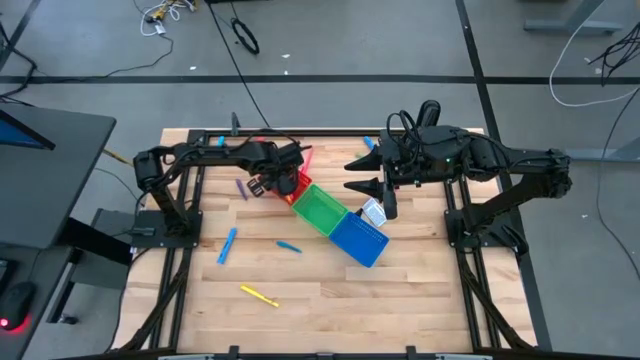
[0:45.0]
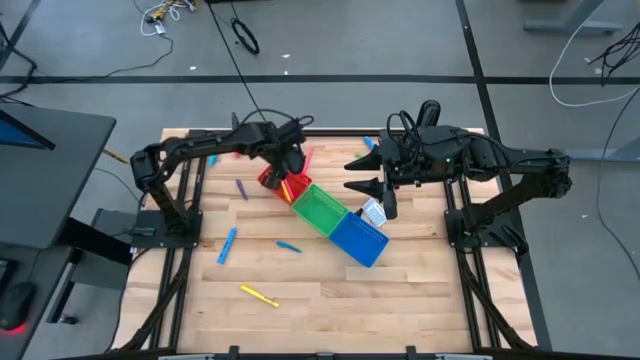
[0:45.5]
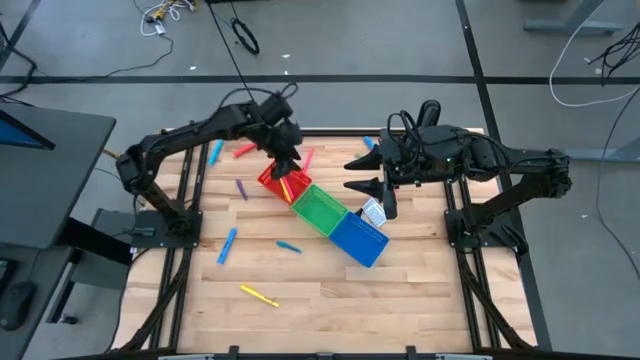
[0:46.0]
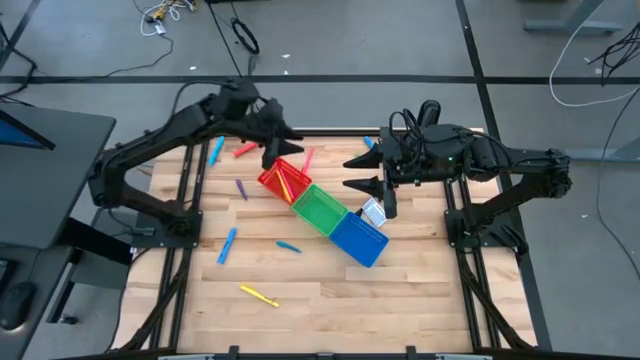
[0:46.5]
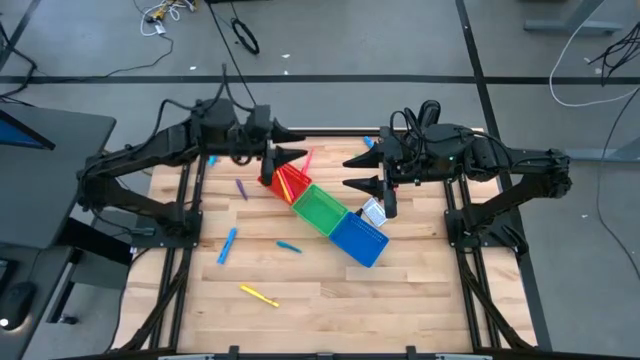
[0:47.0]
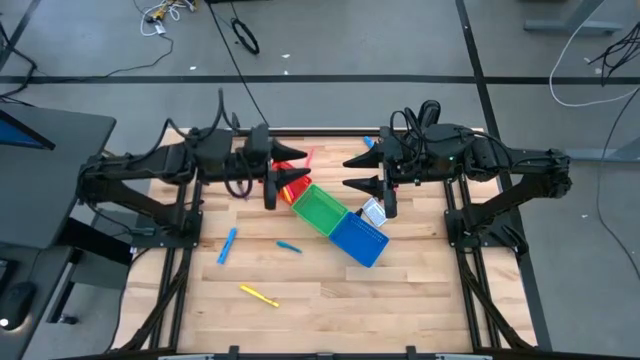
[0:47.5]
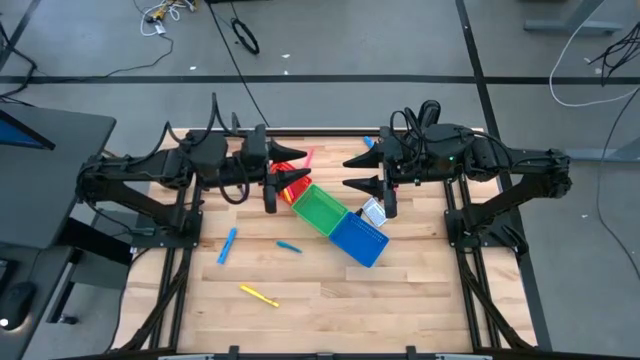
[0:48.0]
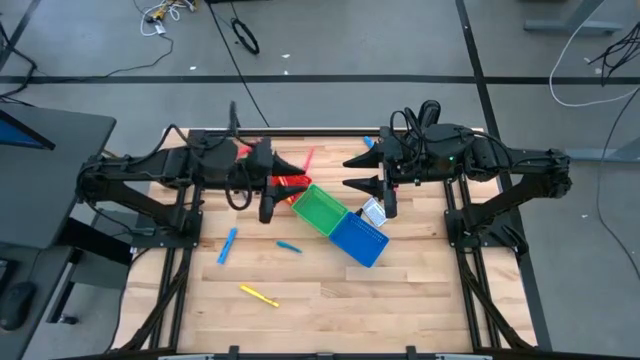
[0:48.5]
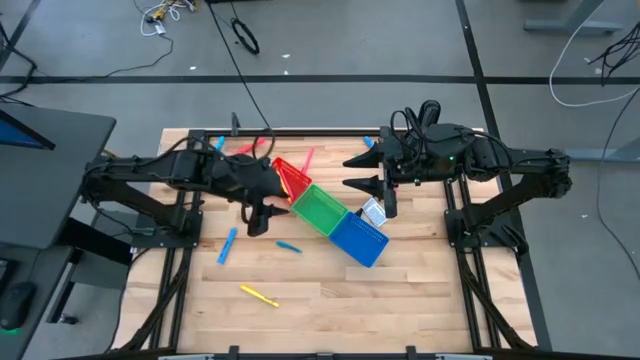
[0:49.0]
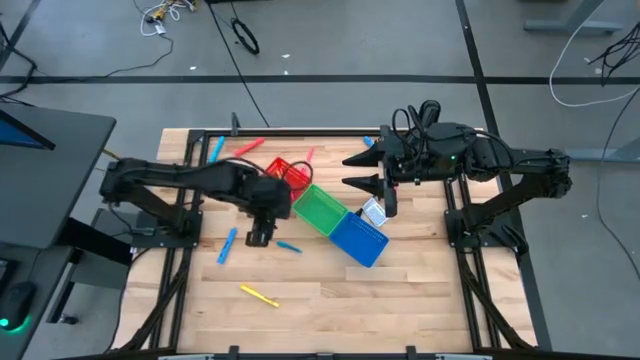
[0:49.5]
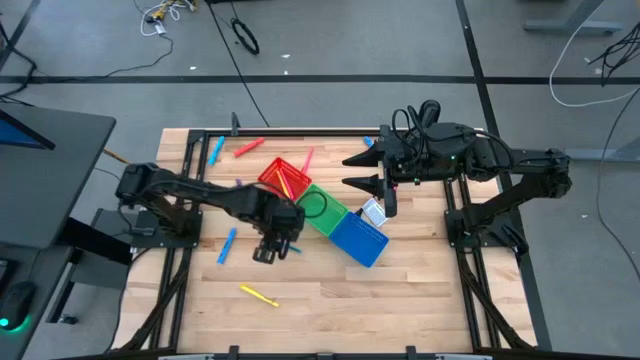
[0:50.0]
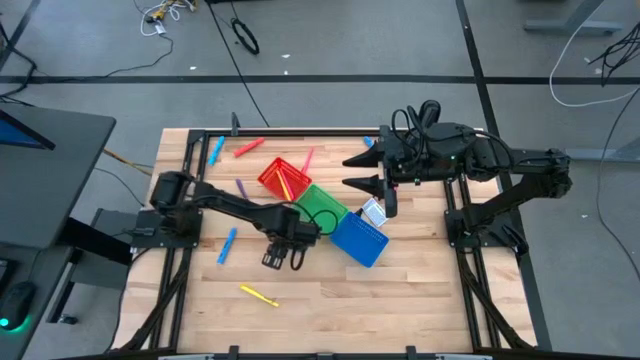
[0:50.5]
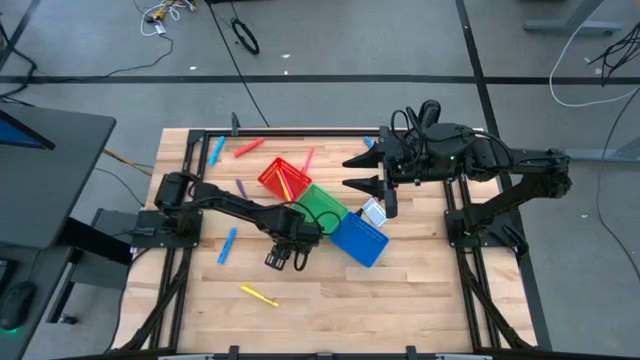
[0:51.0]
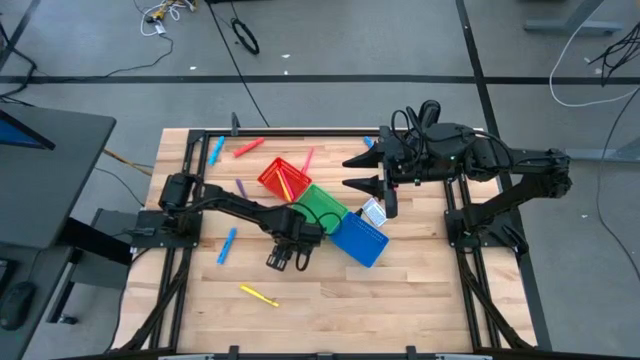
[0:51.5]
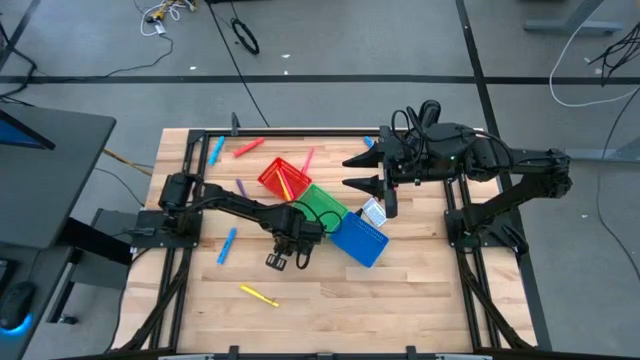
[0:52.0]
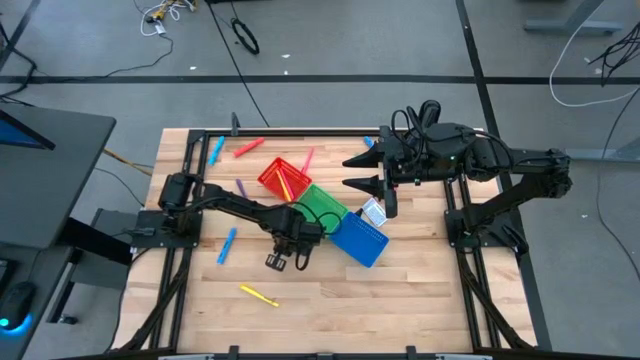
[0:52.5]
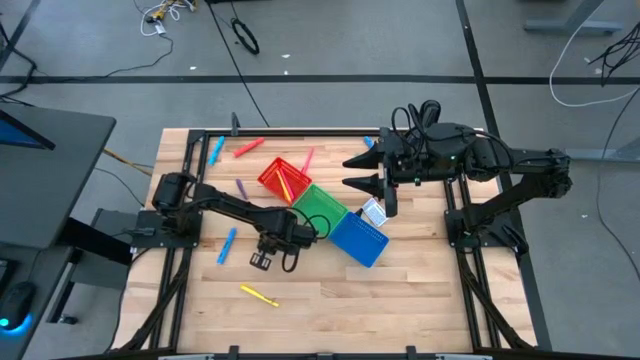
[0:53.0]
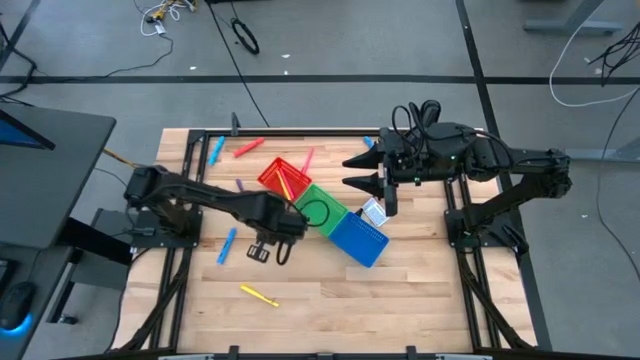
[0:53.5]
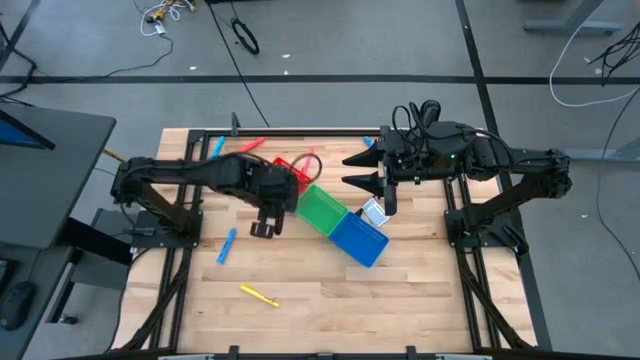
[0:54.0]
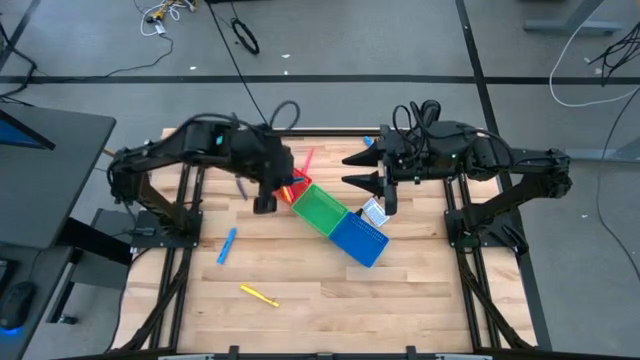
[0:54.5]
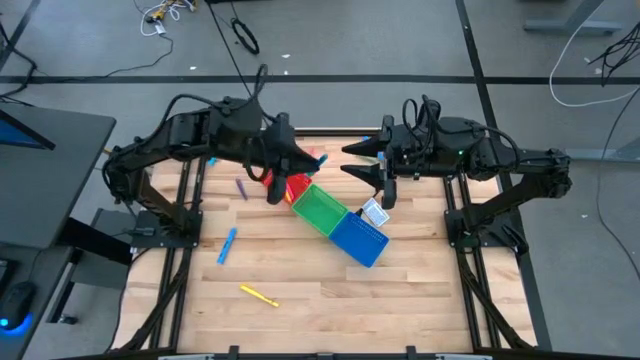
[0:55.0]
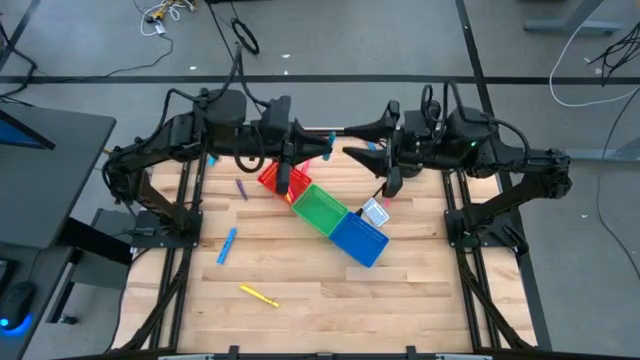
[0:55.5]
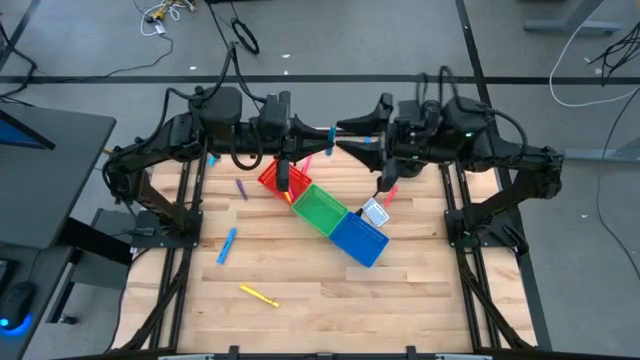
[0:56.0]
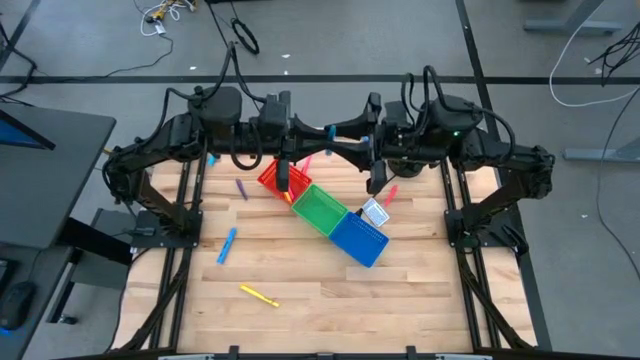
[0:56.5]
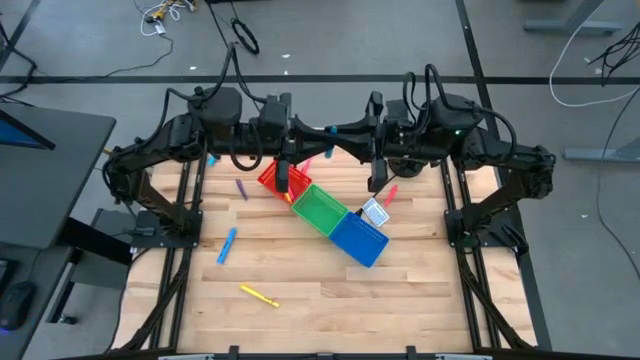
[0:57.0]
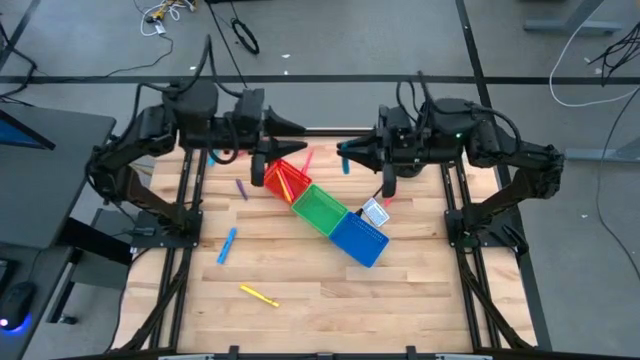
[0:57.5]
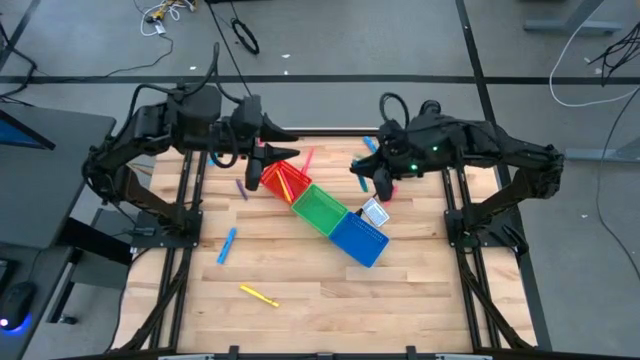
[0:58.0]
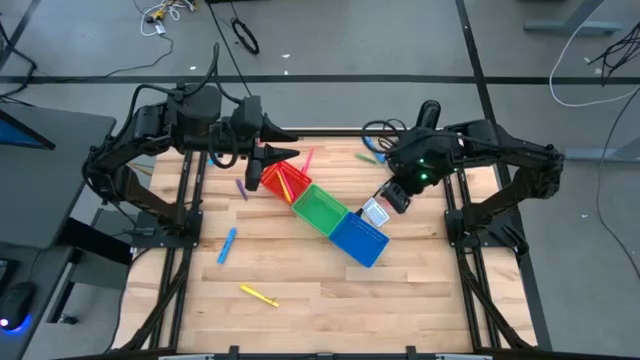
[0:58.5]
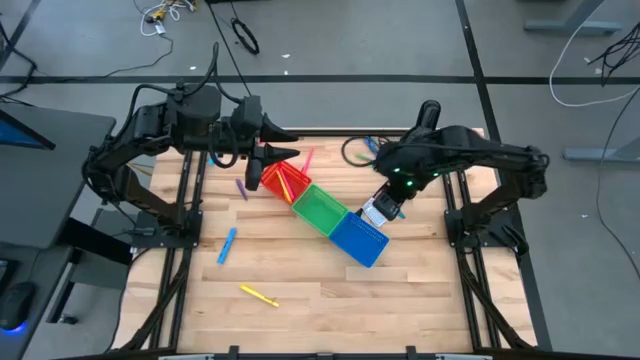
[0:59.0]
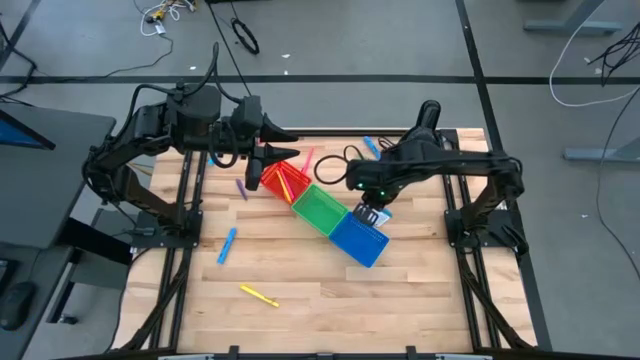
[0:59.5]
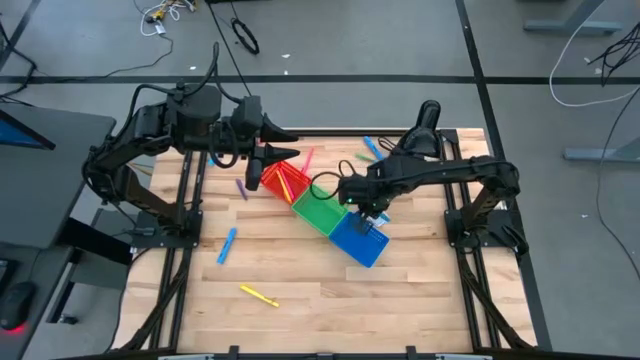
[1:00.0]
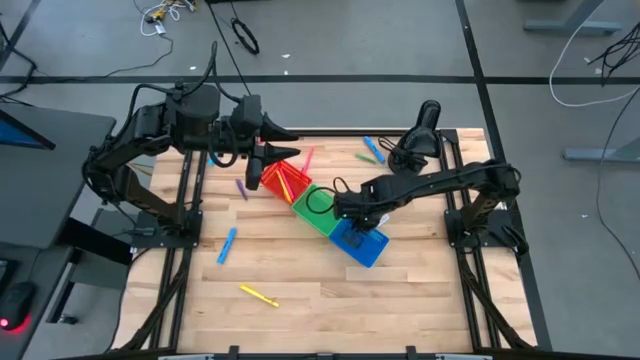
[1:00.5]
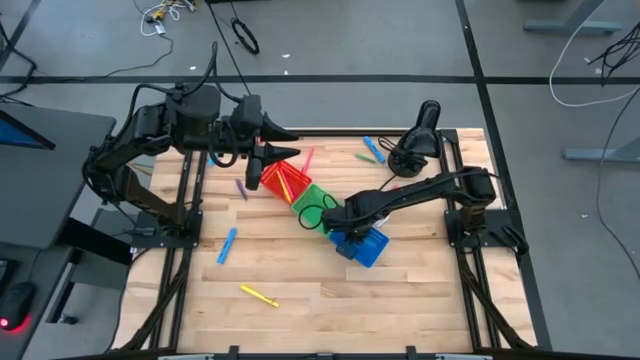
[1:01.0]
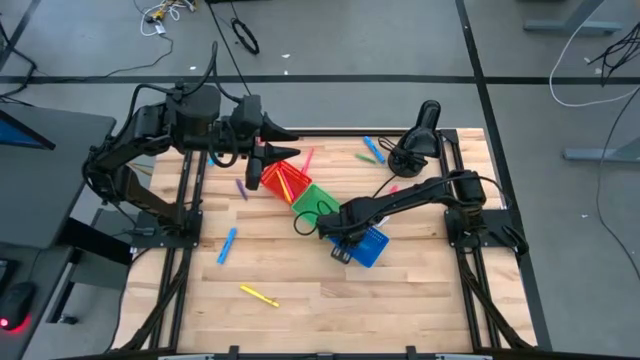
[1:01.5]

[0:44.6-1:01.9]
Task: Pick & Place Markers
Put the blue pen into the blue bin

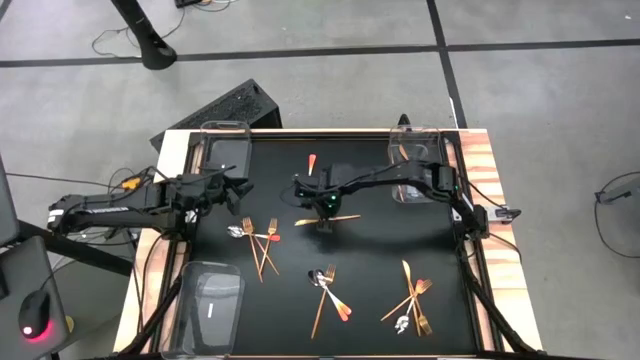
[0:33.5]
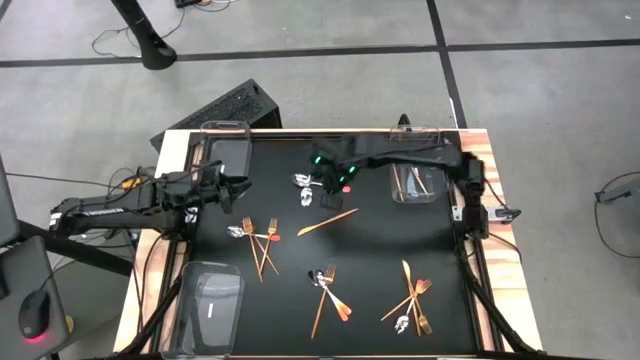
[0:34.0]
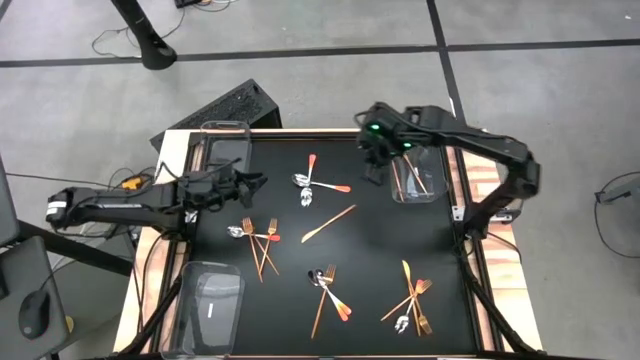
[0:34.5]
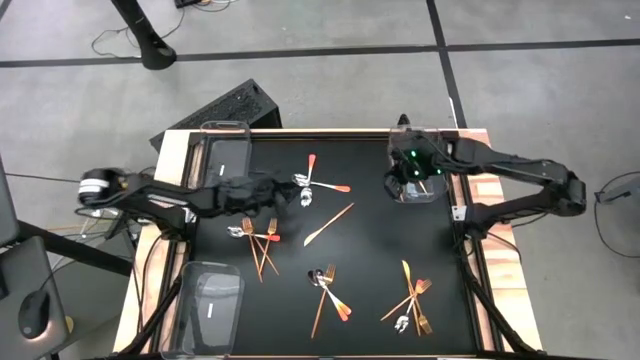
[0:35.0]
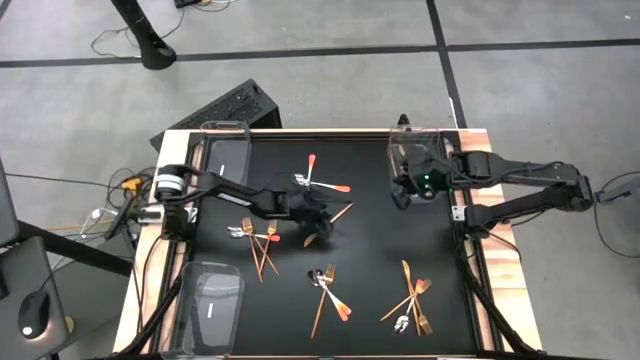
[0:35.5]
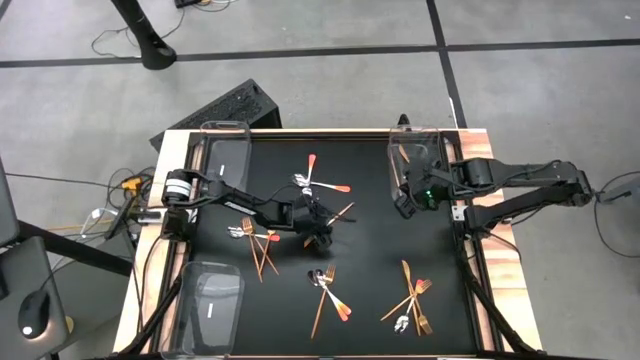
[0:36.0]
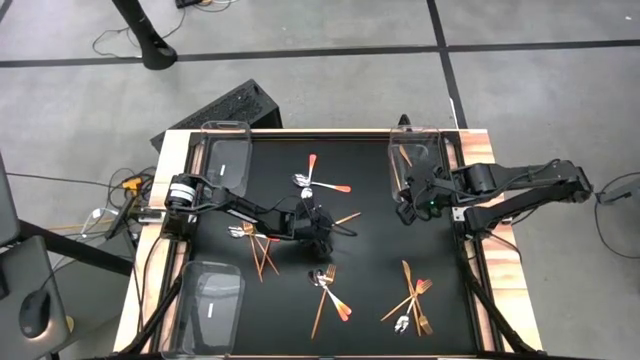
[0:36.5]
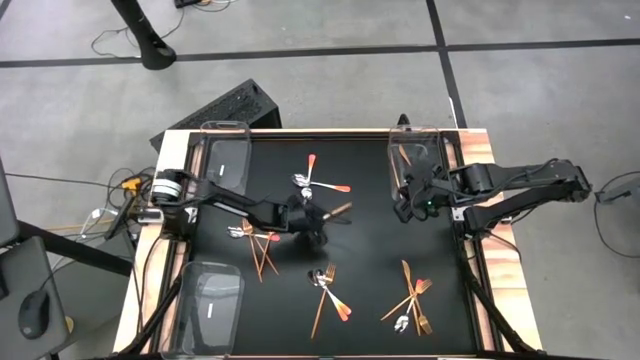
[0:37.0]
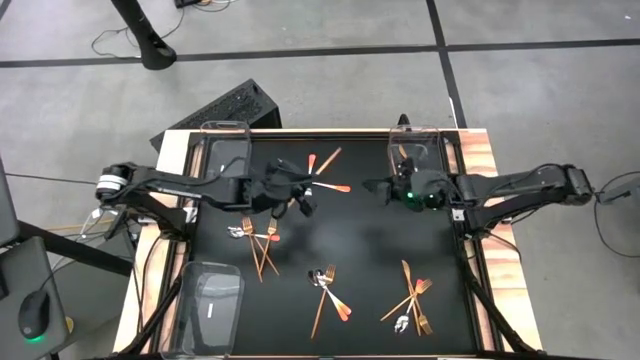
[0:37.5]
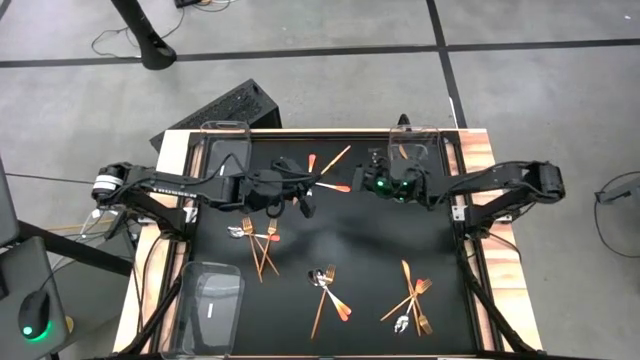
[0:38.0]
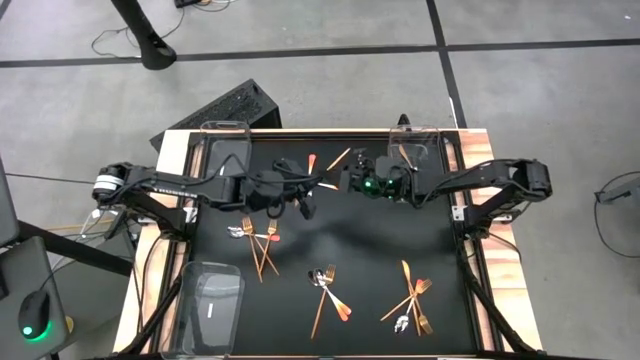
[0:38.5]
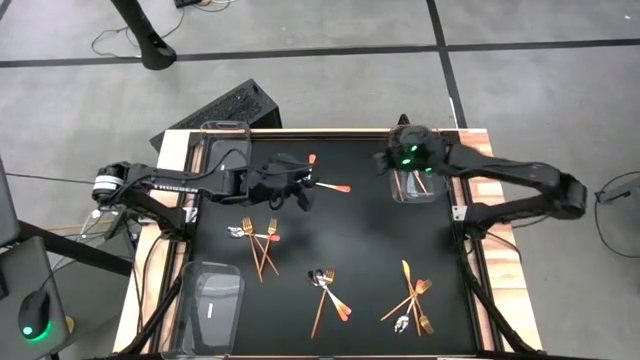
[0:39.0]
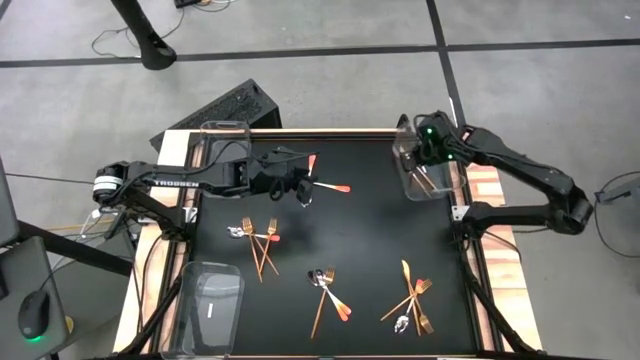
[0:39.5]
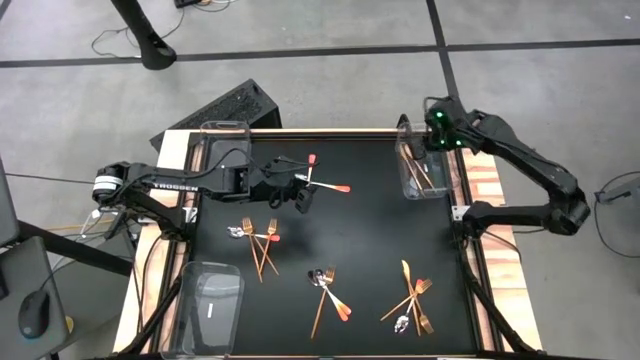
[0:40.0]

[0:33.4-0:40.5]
Task: Sort silverware by color (type)
Put the gold table knife into the top right transparent bin
